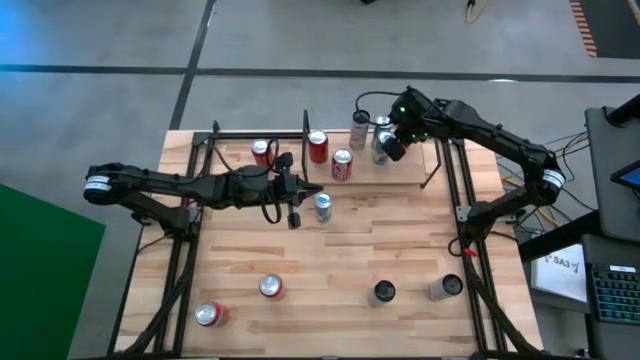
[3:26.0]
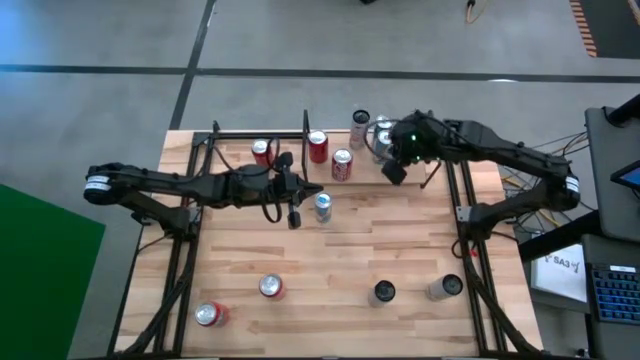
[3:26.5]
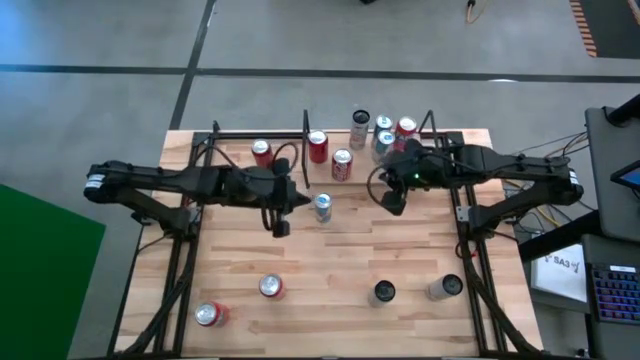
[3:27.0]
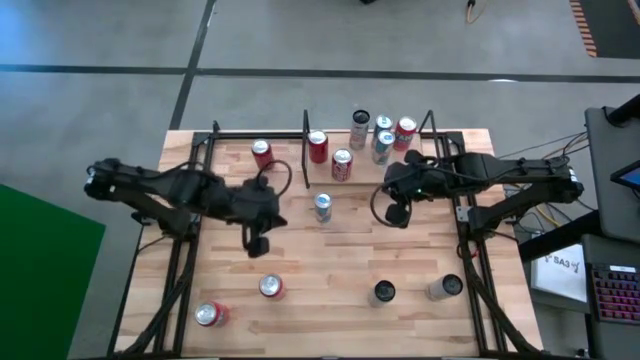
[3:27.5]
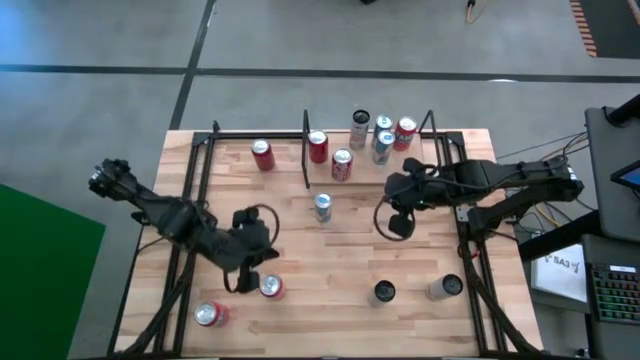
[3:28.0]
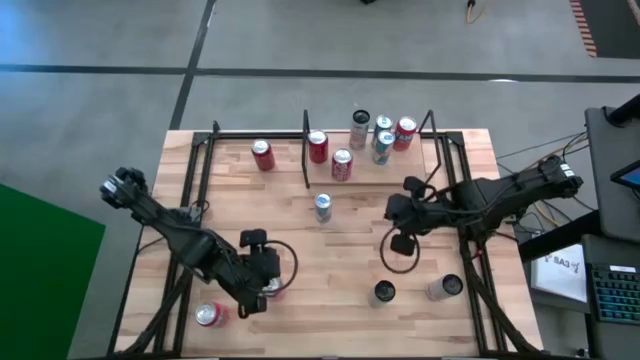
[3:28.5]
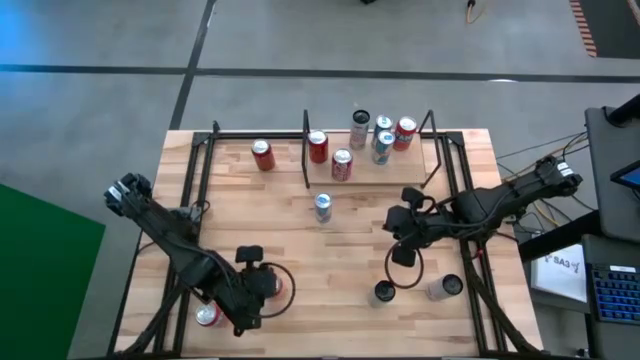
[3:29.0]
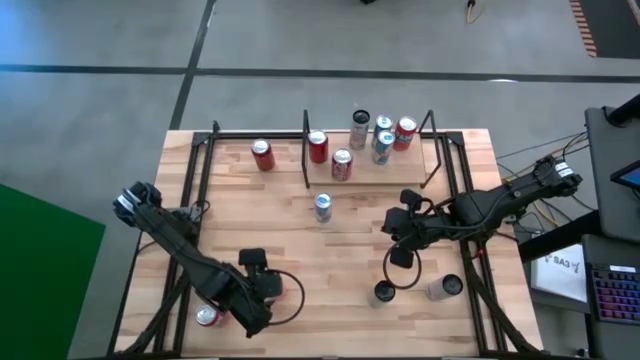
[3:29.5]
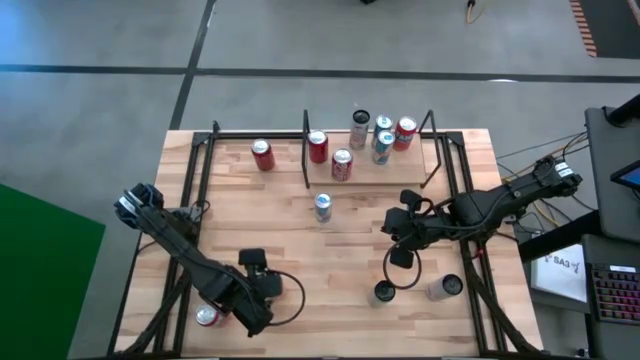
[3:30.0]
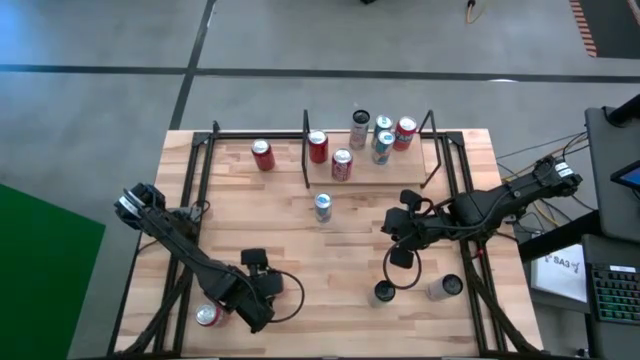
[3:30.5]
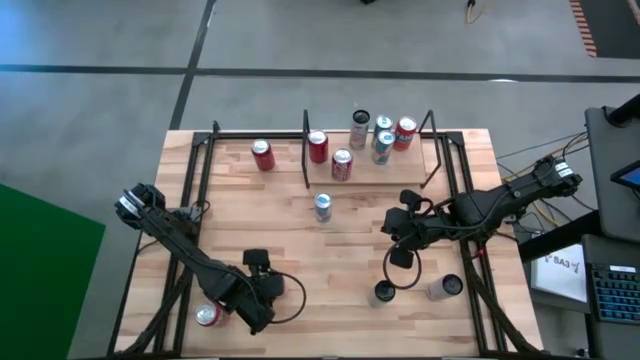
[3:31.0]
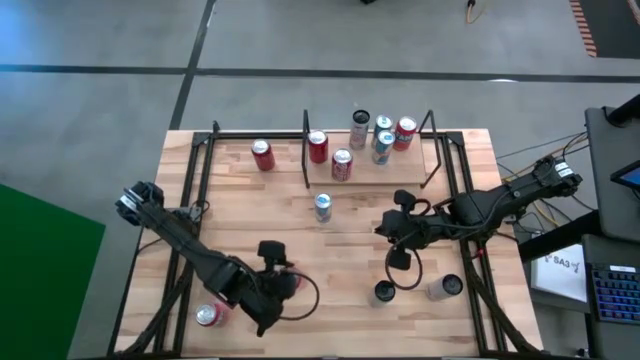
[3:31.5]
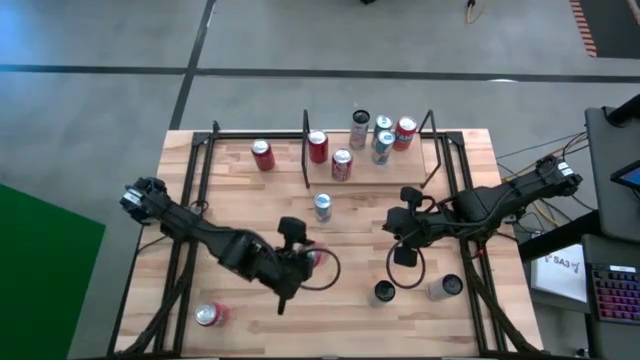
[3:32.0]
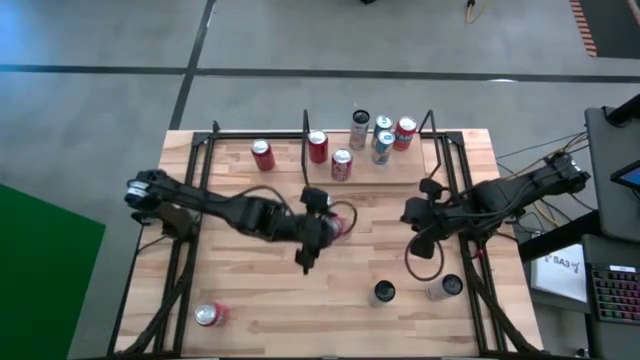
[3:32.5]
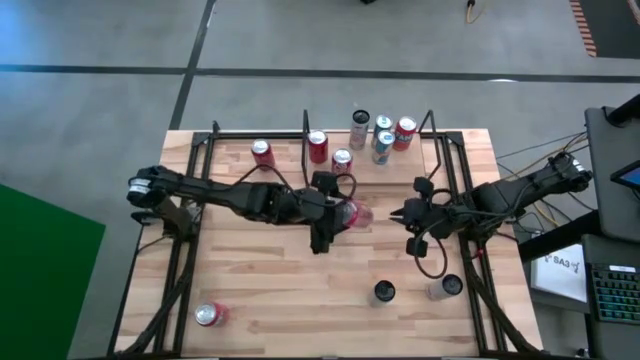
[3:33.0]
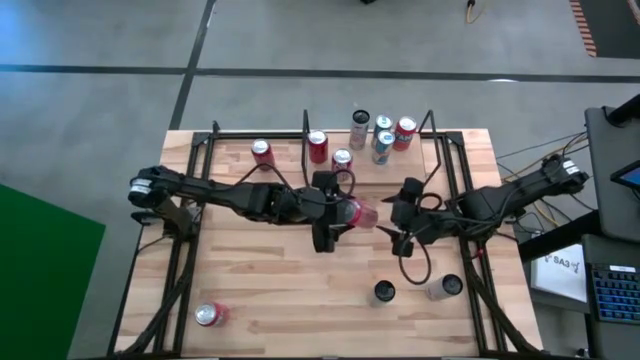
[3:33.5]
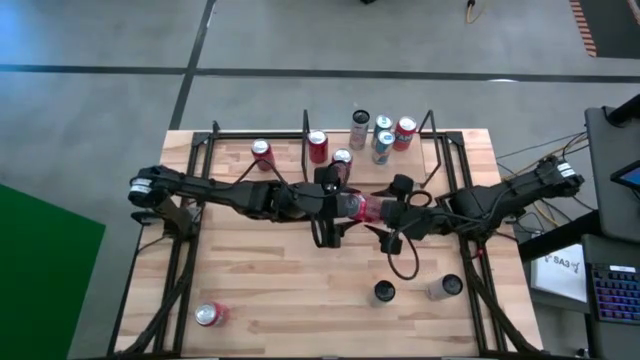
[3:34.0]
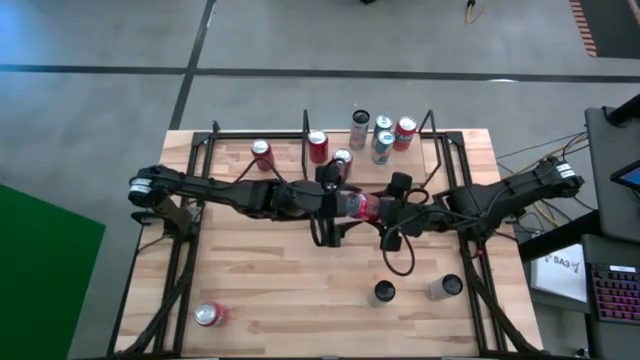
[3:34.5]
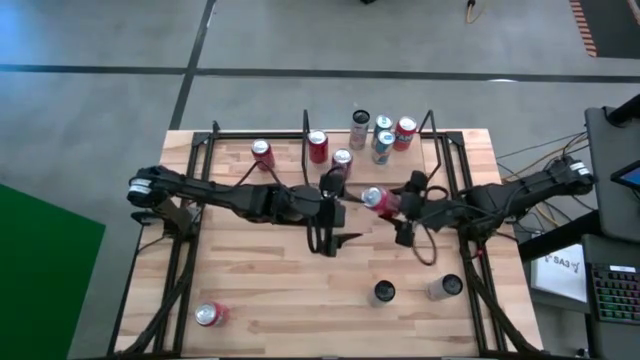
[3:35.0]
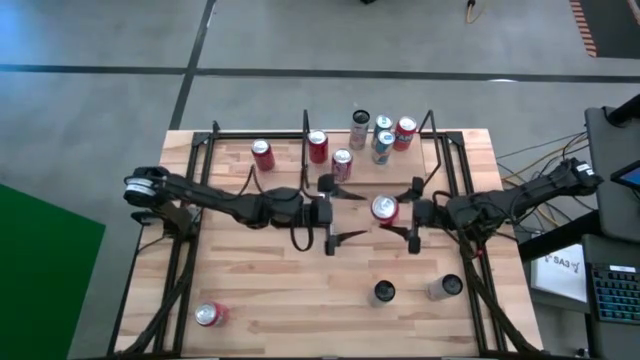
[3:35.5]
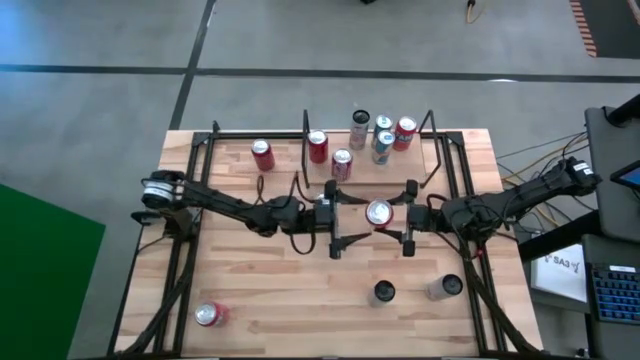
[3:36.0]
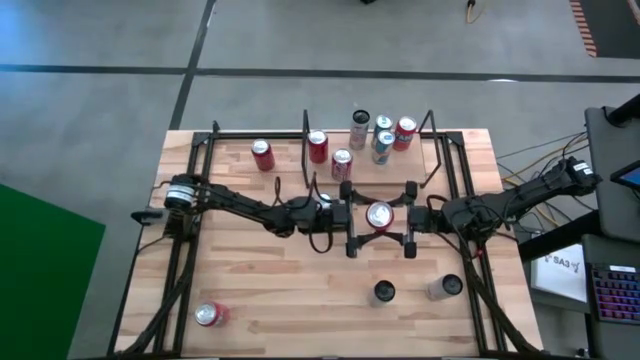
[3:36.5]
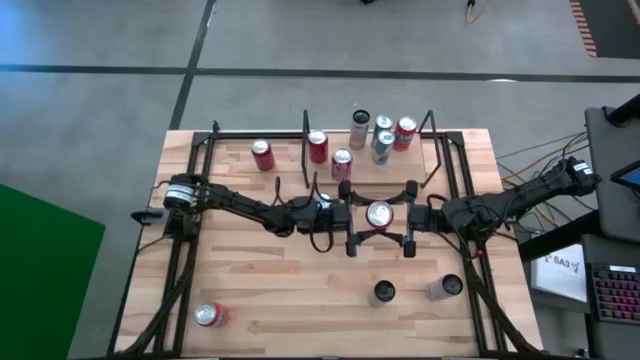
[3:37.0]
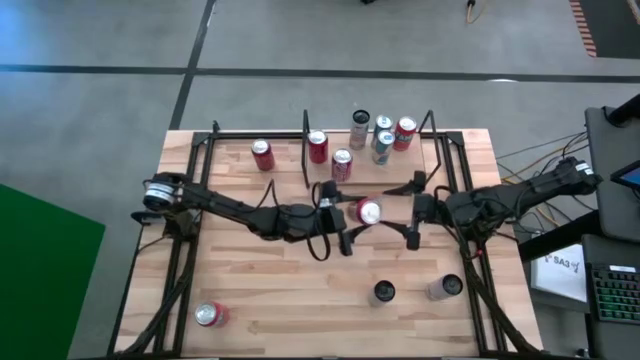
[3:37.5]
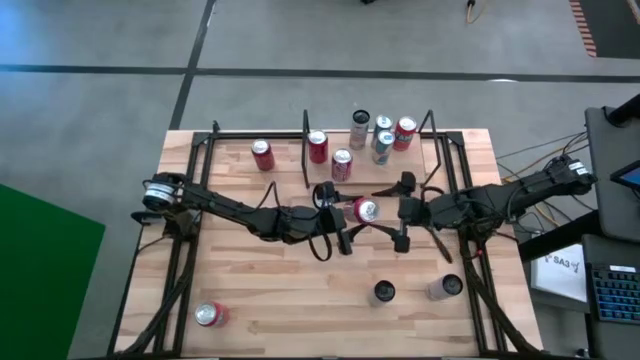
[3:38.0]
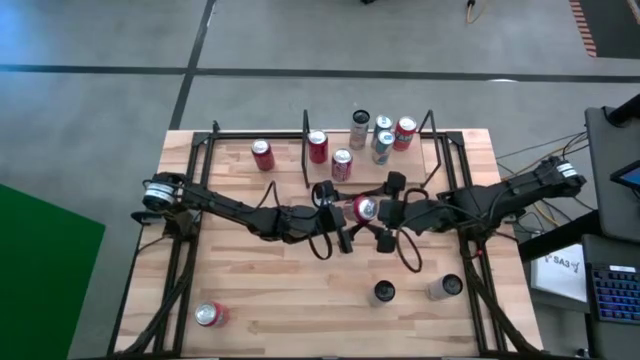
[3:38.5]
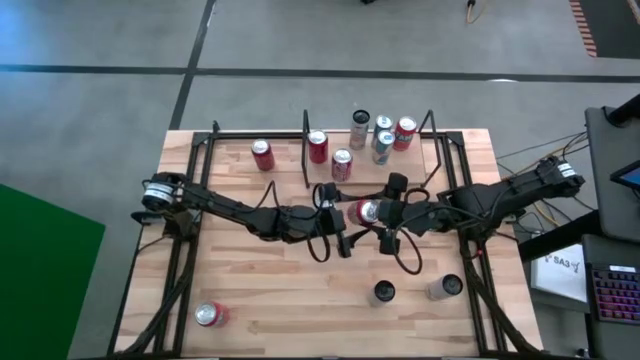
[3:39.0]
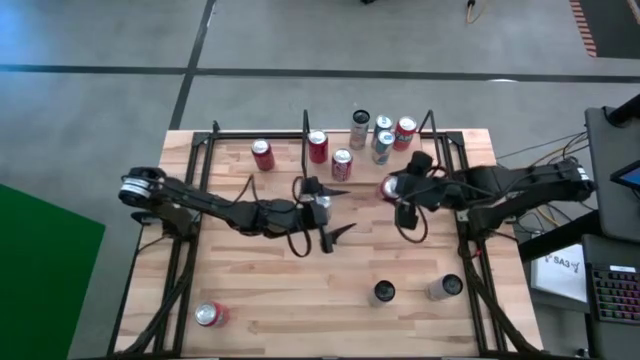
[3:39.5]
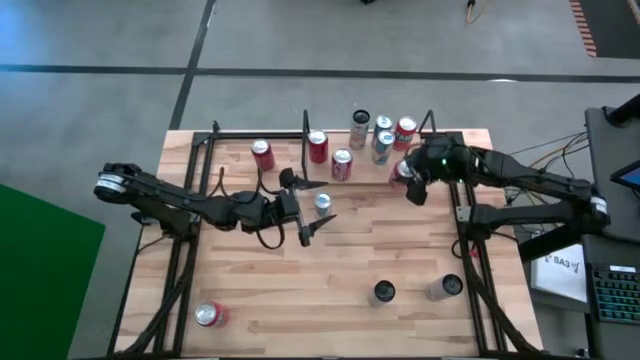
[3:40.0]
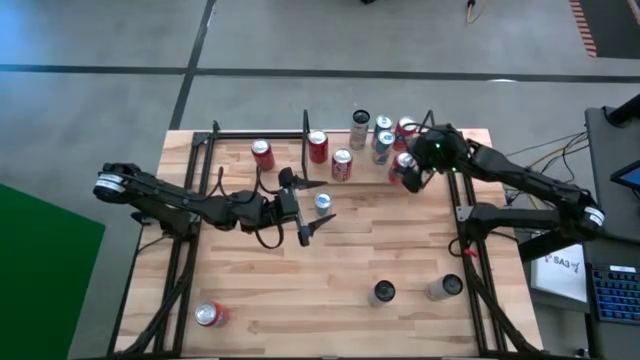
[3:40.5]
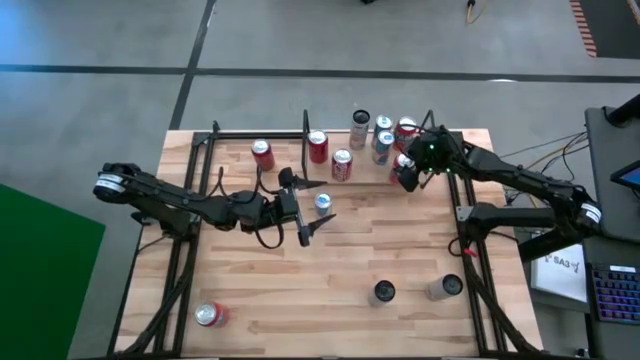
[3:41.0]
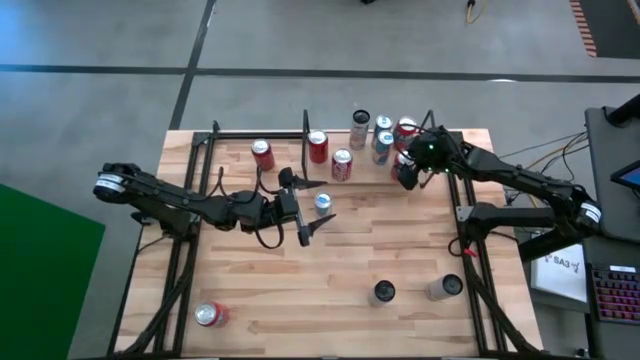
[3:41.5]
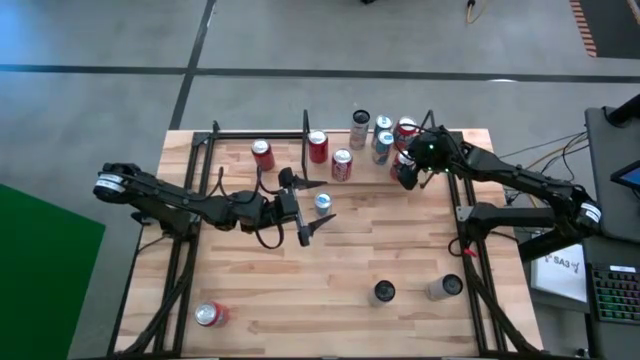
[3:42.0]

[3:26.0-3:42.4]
Task: Place canned beverage on shelf
Put the red soda can on the shelf

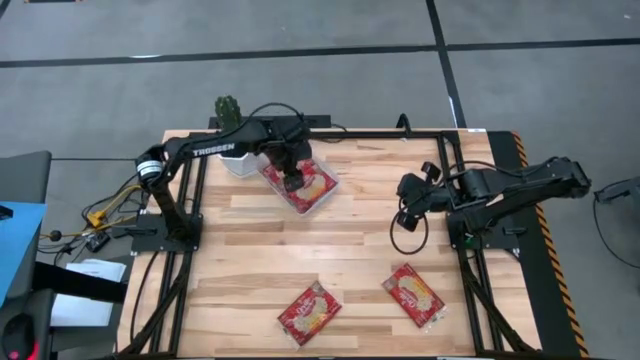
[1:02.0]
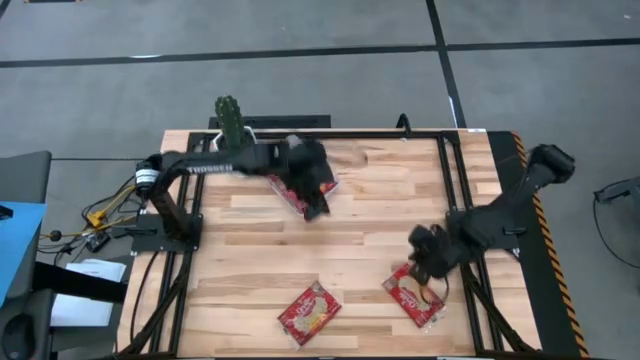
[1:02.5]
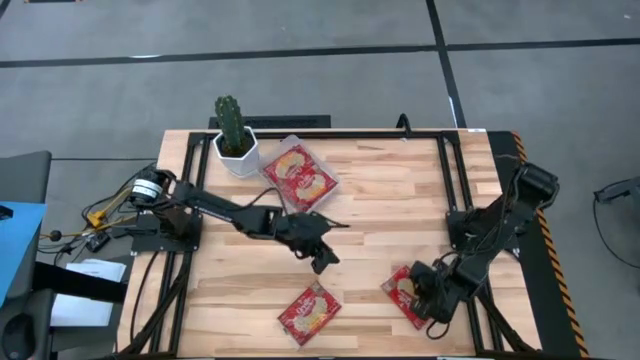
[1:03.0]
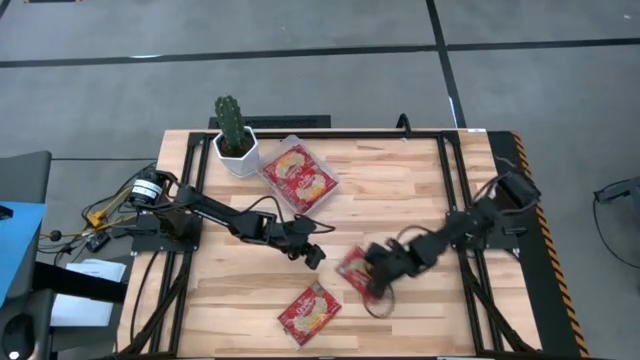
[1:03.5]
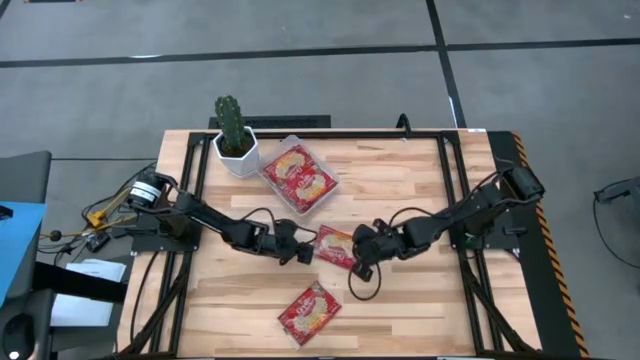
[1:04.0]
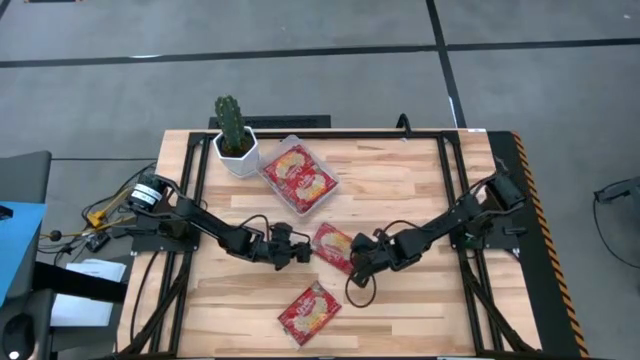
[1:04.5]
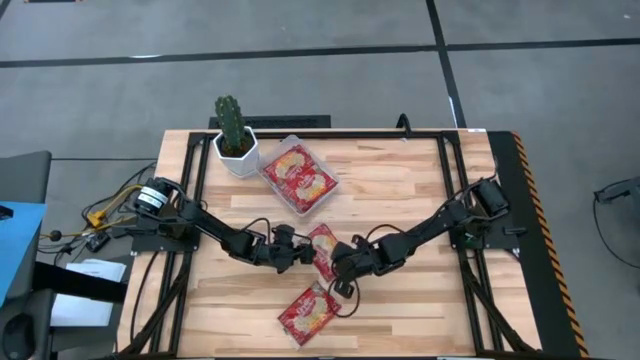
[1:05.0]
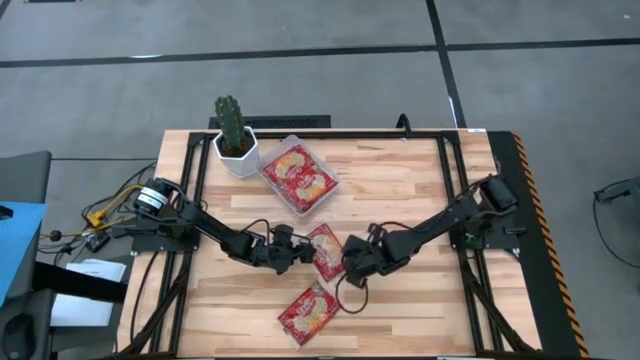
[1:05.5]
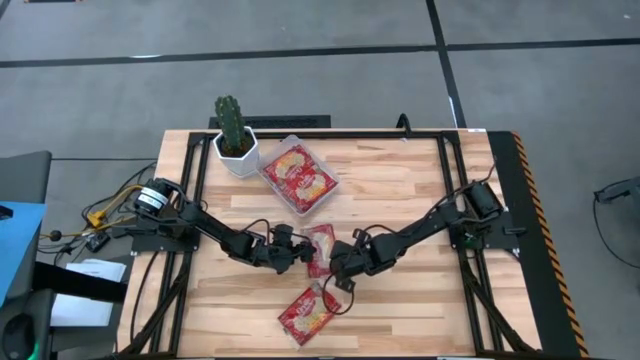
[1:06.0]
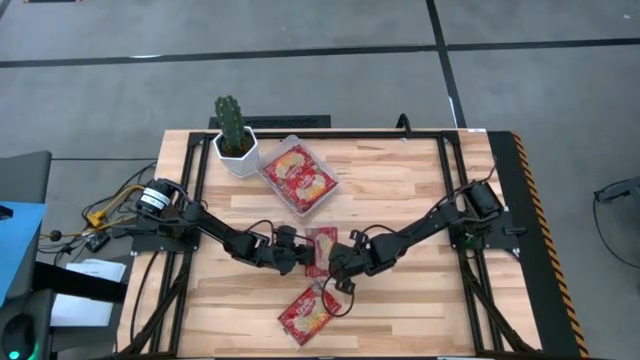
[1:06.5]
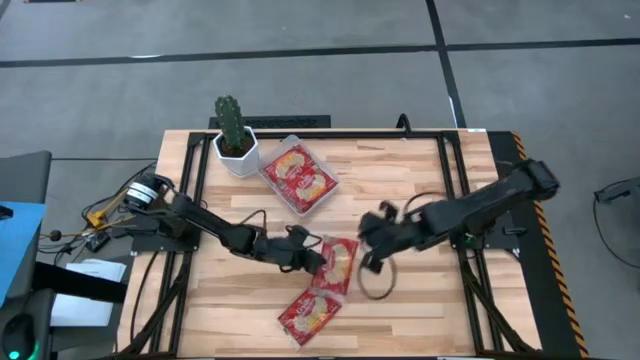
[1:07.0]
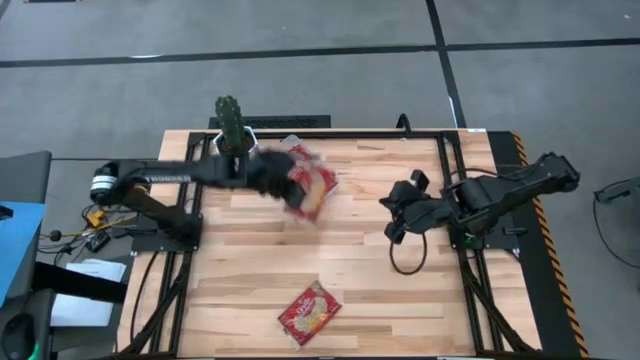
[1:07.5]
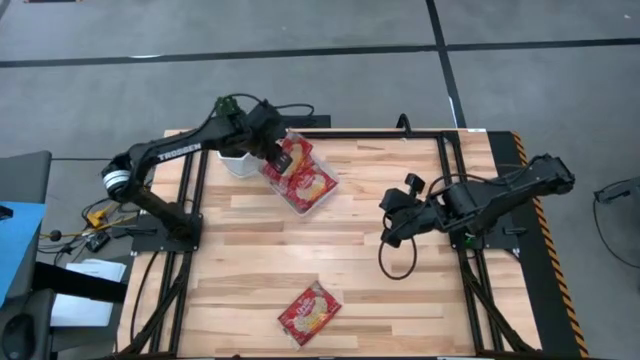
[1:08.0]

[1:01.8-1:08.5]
Task: Sort popcorn bags into baskets
Put the red popcorn bag into the transparent bin
